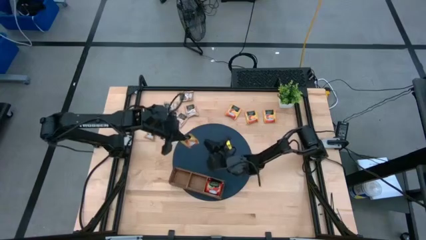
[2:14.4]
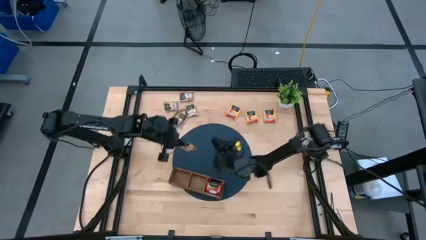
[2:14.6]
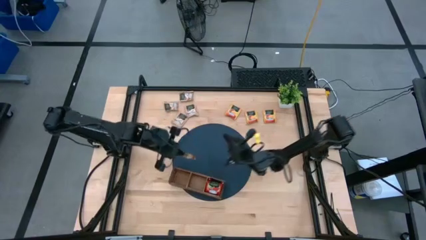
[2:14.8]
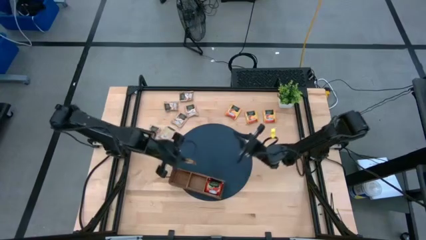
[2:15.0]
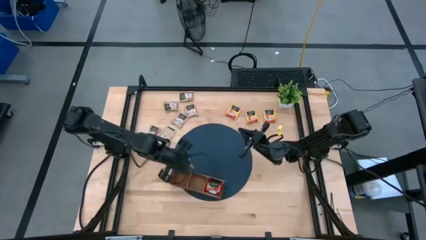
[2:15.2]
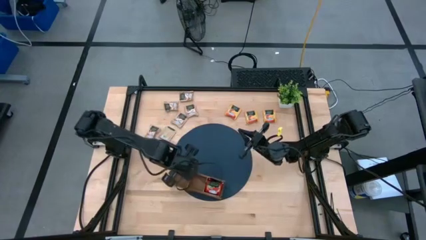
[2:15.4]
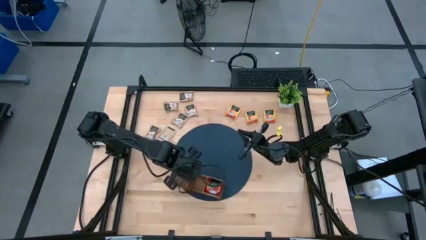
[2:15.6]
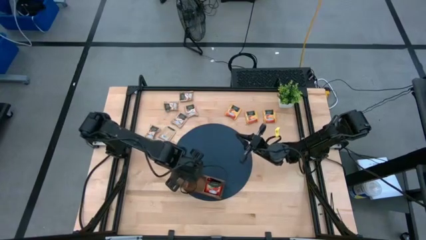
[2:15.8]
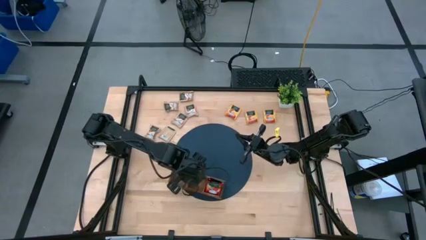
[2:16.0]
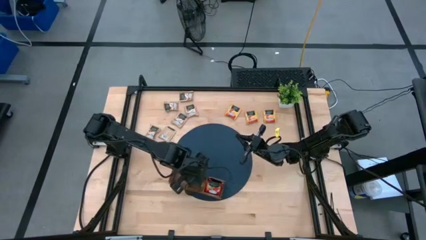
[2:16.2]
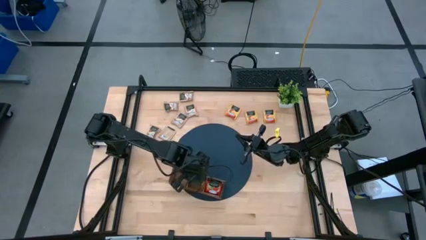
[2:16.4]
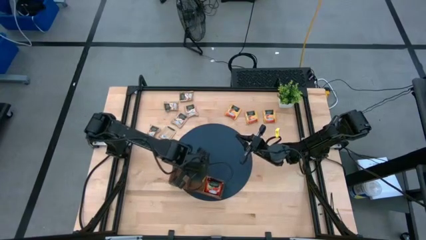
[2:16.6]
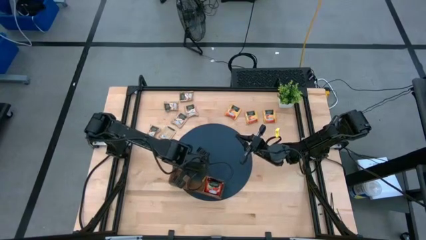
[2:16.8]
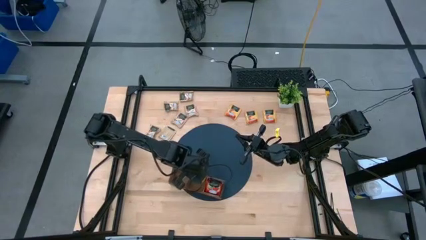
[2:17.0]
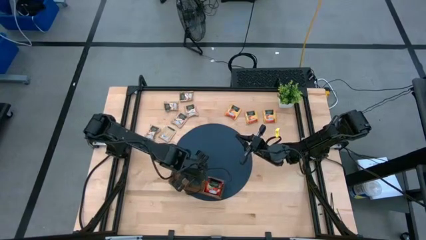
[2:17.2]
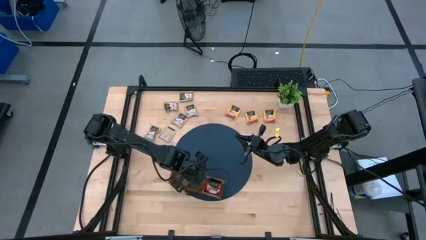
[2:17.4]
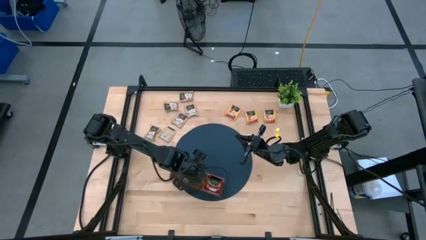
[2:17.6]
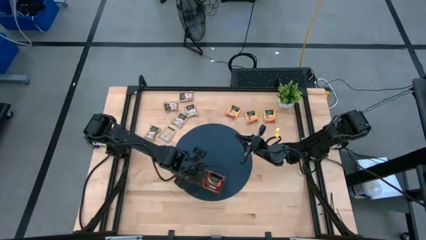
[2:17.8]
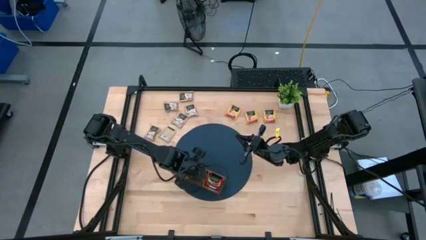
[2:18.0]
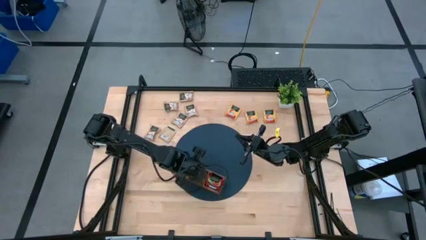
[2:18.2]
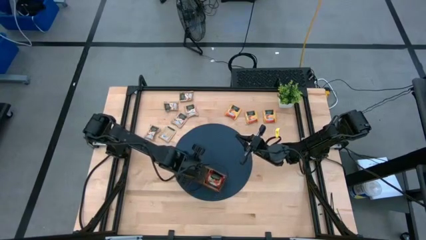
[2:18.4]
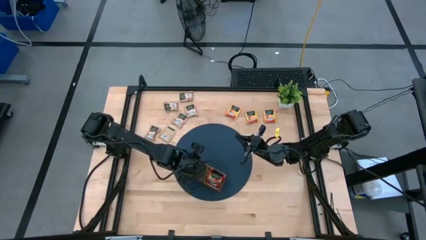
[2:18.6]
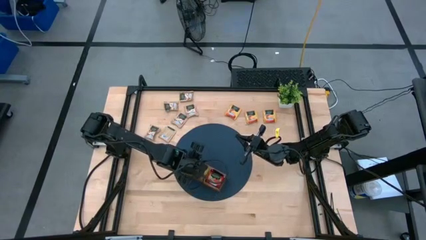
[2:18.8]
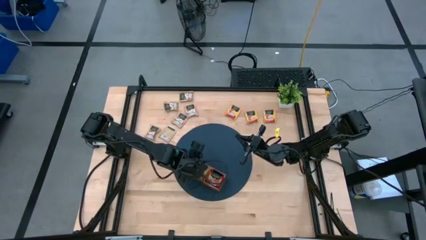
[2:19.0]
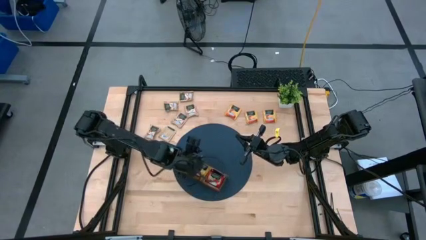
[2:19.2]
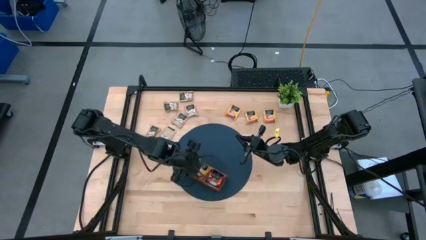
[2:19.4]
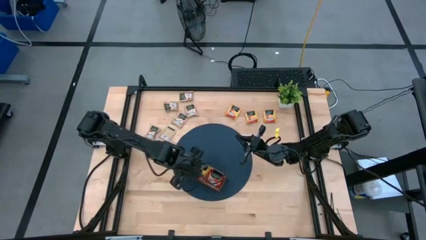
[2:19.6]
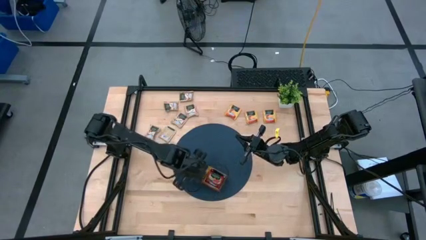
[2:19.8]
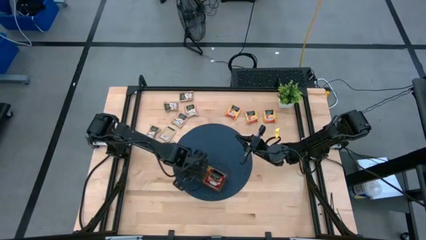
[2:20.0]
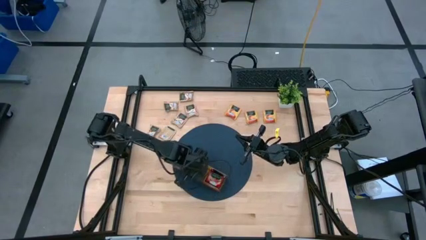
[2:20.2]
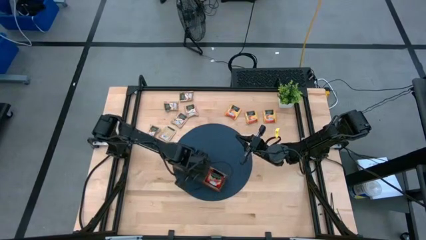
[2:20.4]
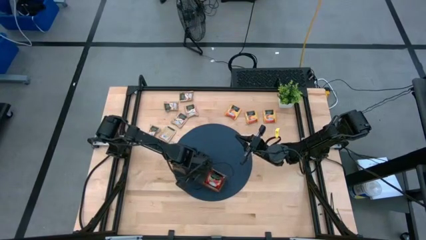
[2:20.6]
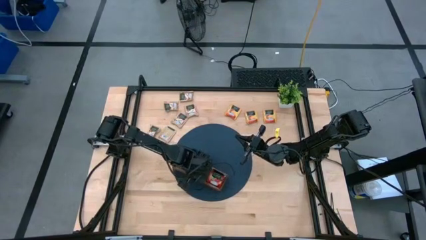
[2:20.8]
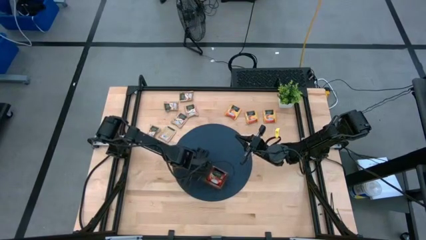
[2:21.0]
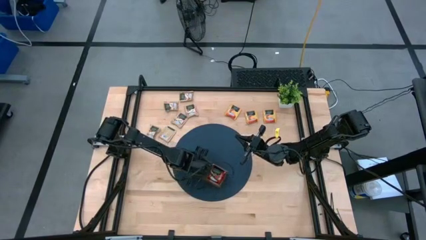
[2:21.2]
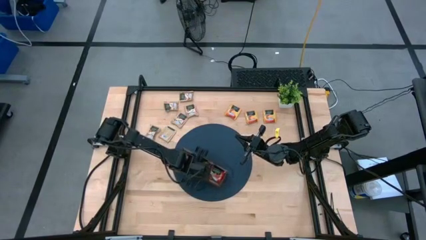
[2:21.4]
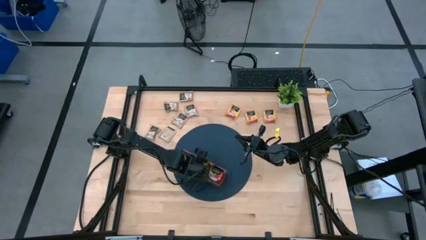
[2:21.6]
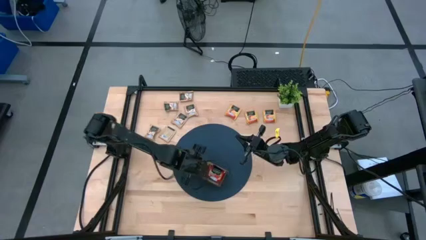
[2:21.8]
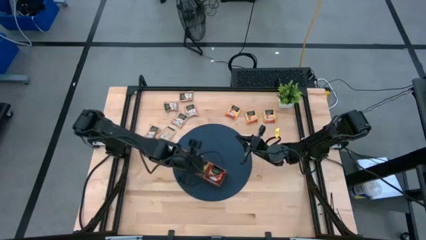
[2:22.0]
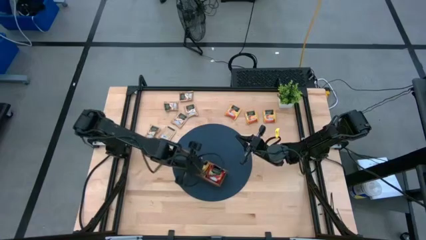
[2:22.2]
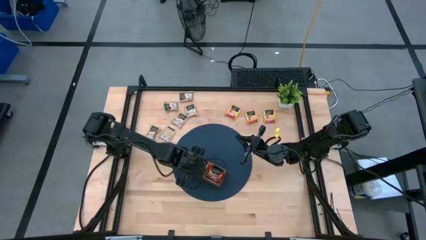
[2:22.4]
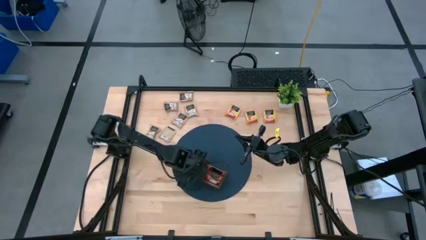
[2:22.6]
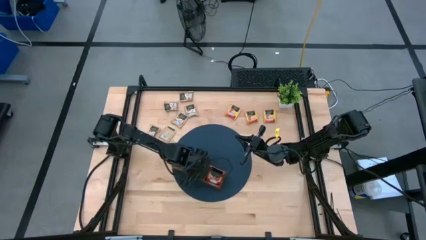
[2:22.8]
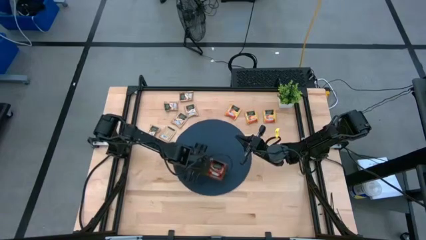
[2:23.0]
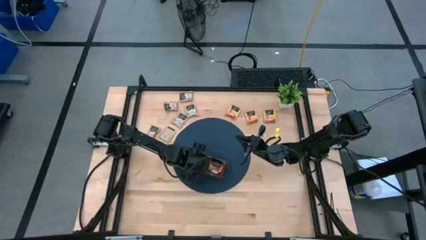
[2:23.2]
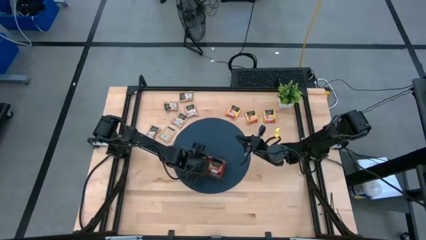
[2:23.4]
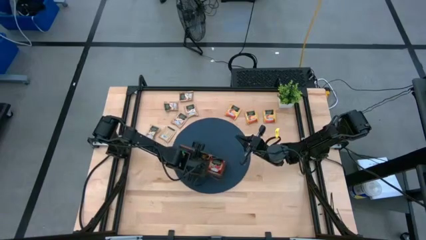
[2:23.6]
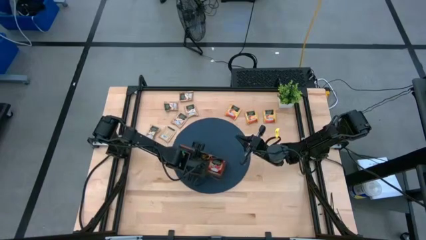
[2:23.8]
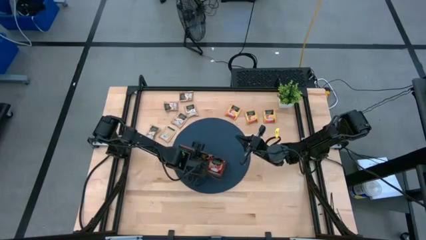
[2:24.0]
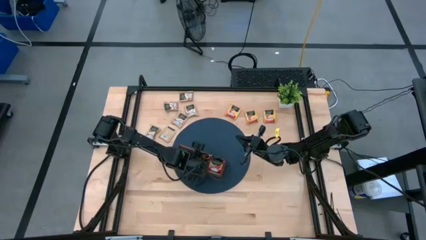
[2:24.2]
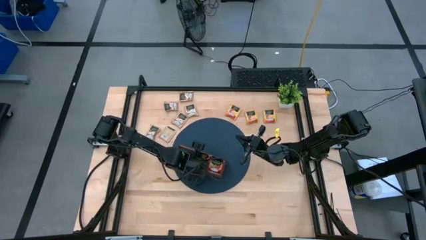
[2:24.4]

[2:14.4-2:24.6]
Task: Pick & Place Tea
Put the yellow tea bag into the middle section of the wooden organizer

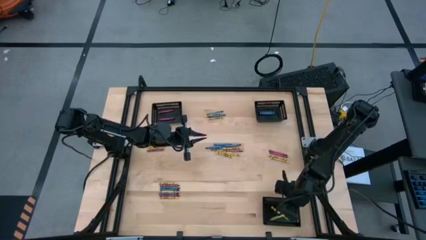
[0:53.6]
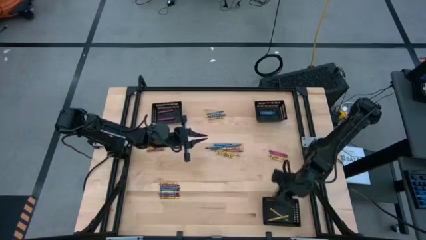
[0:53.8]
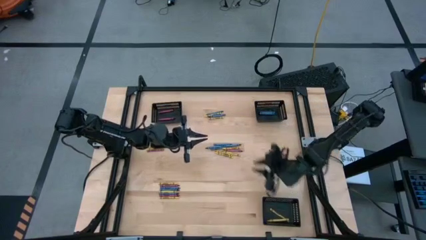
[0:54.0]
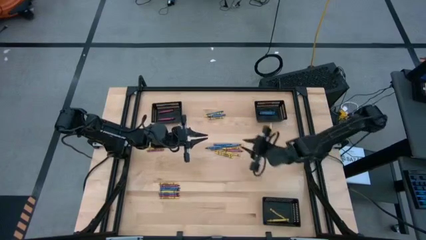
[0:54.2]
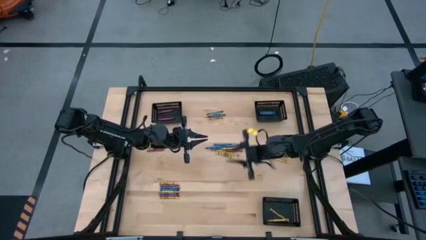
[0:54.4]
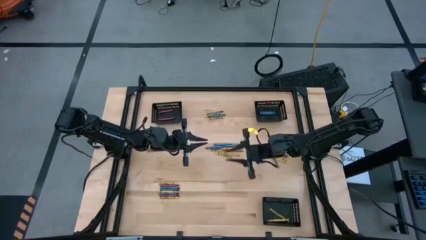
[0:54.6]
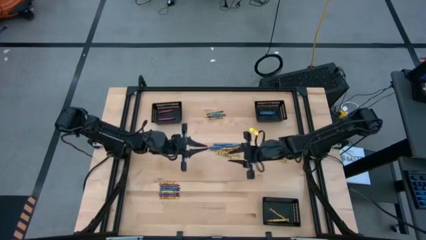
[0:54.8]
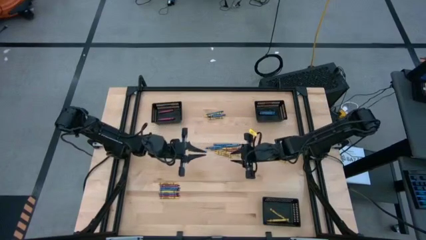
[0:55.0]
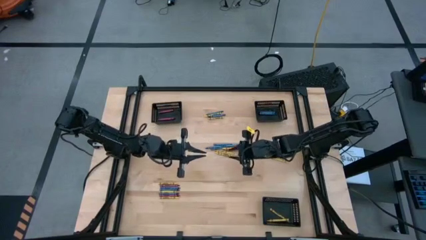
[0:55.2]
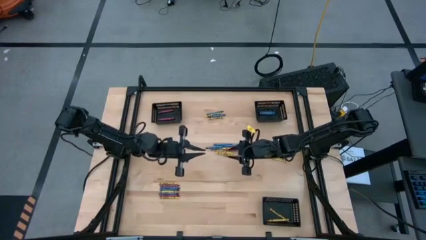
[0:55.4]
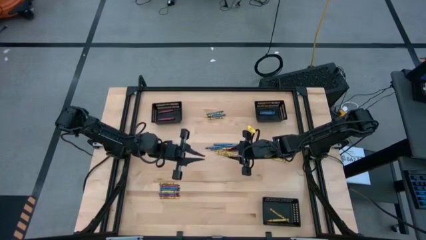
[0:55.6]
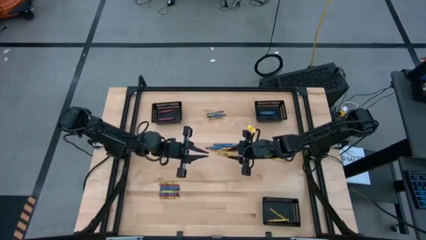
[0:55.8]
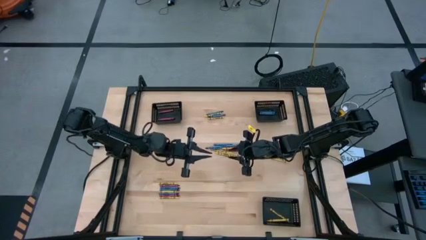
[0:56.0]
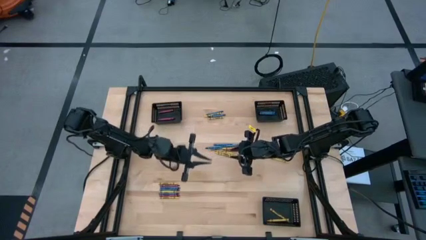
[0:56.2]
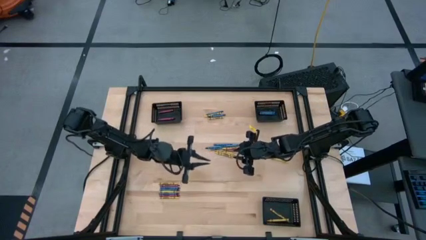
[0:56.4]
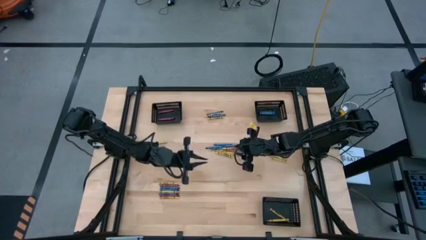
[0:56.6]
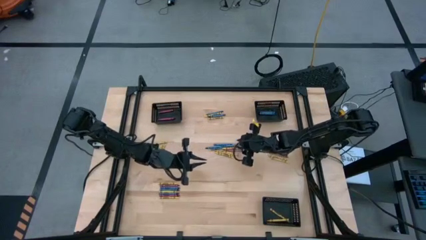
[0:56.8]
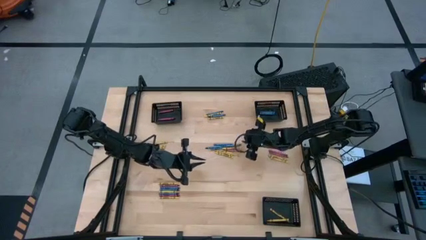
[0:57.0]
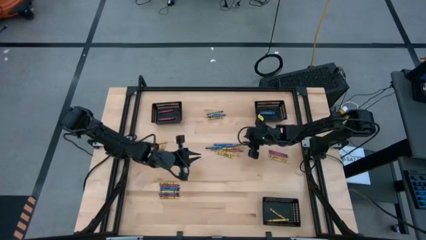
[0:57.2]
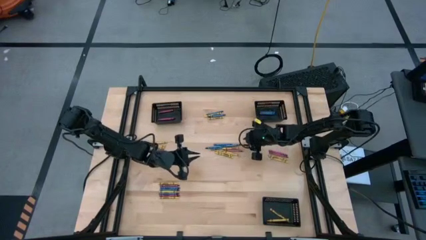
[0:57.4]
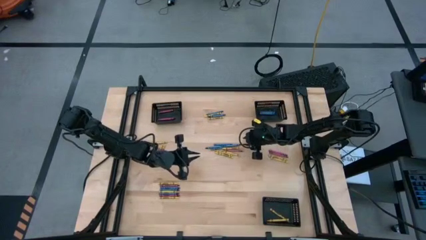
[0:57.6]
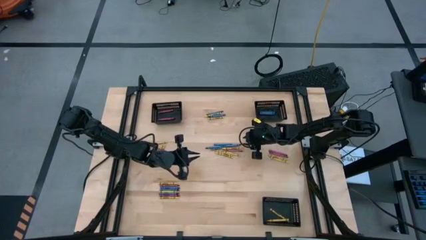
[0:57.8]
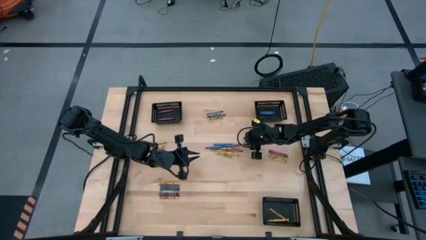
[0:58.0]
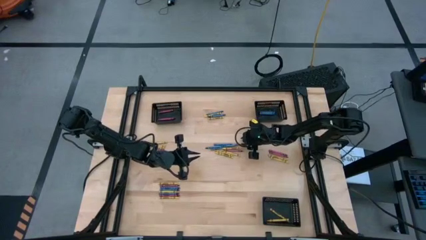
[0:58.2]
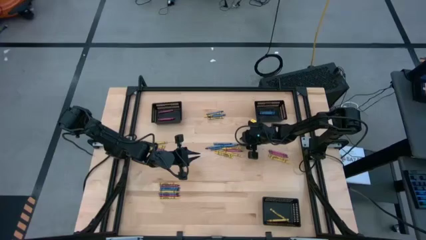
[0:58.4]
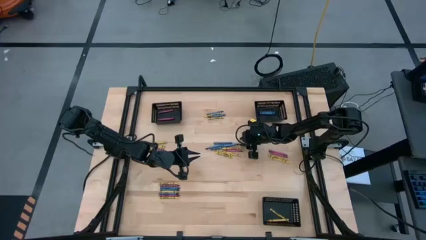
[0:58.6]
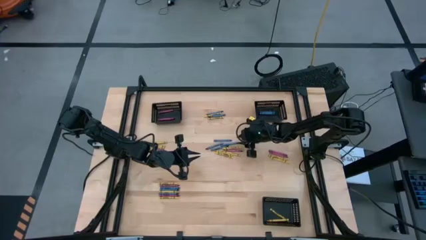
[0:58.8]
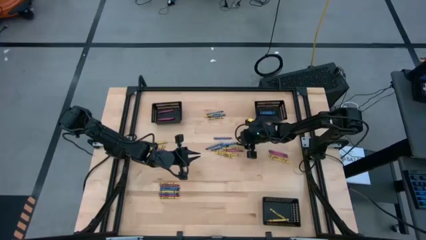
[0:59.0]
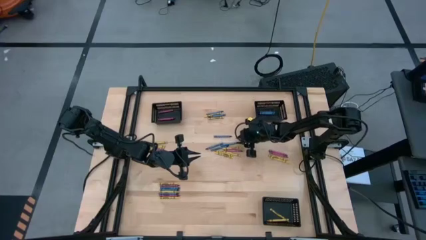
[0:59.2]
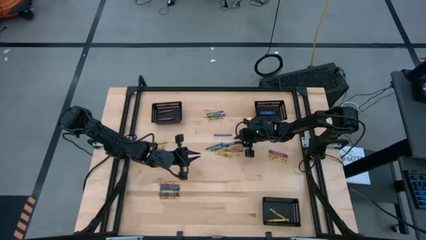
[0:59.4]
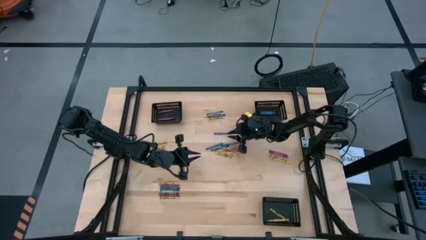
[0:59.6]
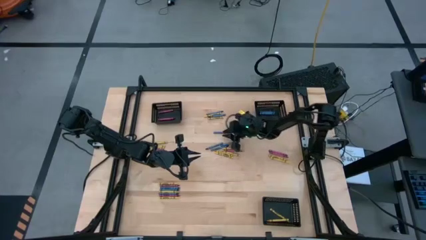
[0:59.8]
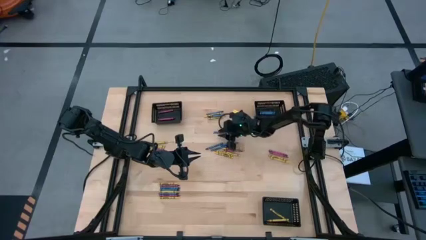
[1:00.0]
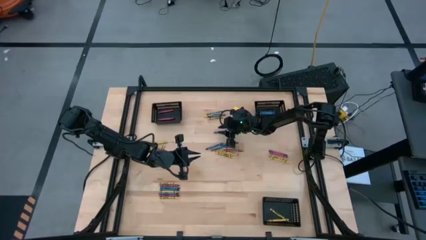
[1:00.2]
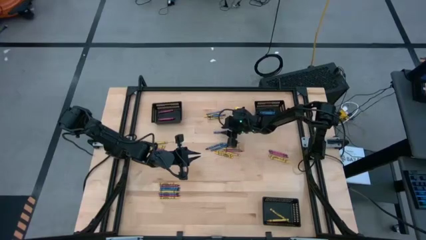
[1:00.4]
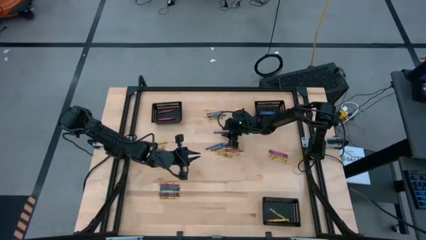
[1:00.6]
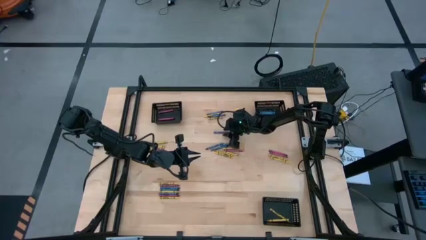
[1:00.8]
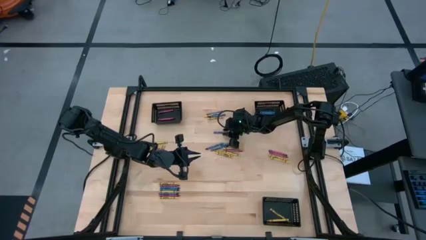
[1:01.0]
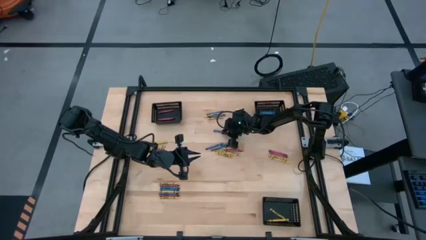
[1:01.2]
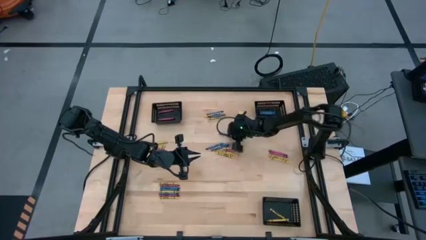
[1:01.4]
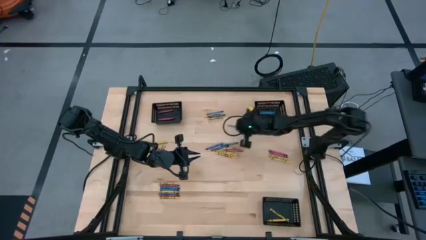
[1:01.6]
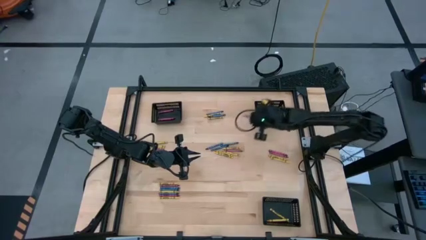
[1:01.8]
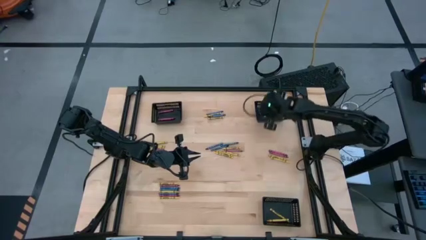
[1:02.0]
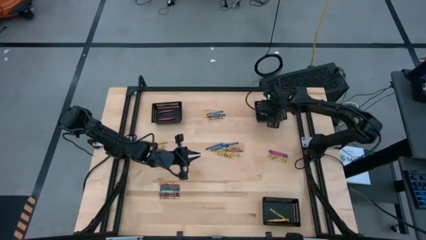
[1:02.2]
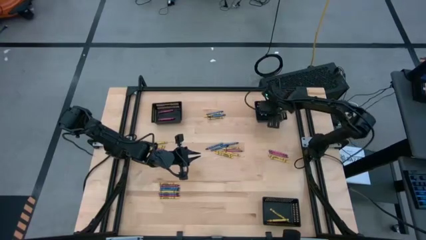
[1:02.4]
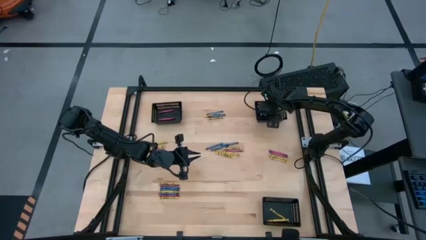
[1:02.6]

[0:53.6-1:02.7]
Task: Sort crayons
Put the blue crayon into the top right black bin
